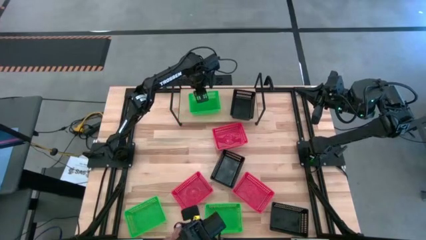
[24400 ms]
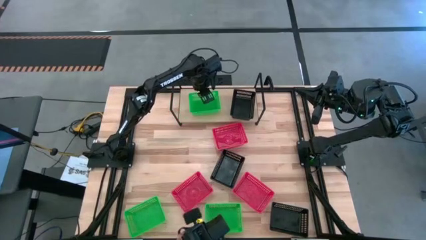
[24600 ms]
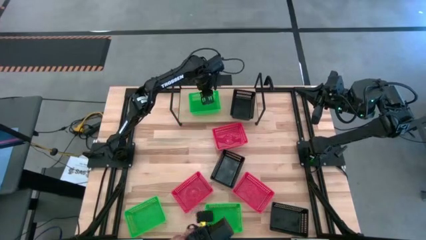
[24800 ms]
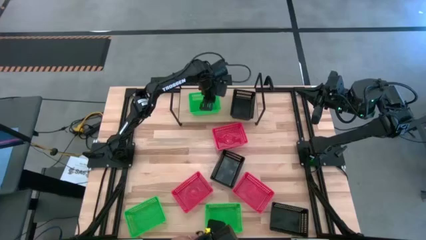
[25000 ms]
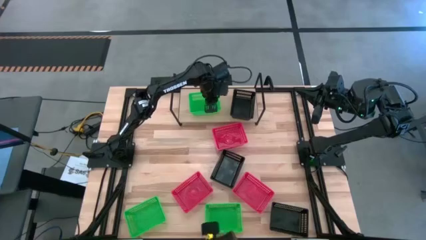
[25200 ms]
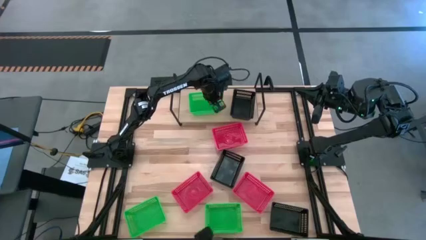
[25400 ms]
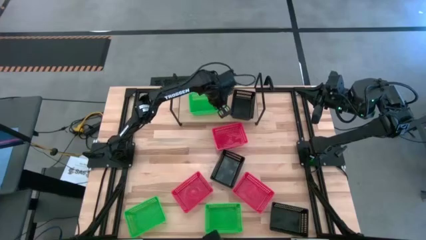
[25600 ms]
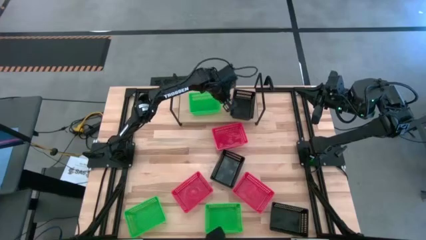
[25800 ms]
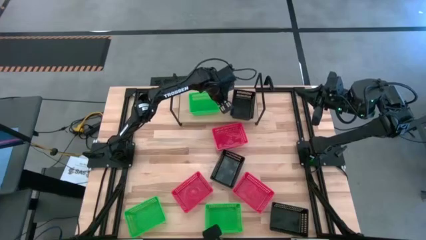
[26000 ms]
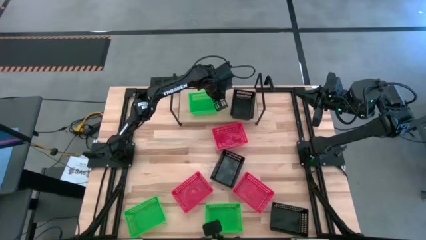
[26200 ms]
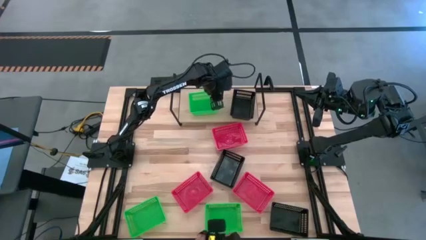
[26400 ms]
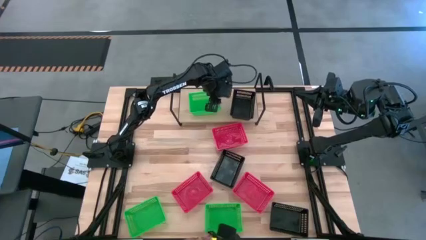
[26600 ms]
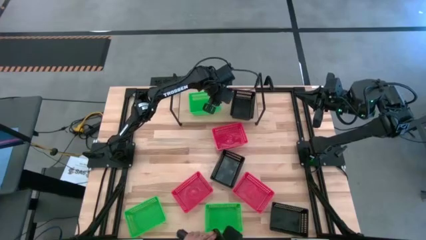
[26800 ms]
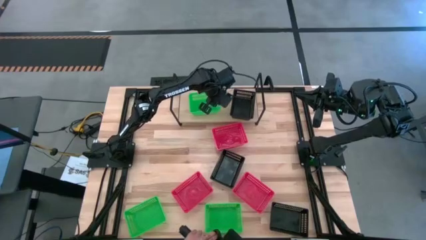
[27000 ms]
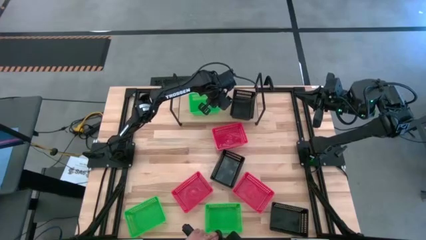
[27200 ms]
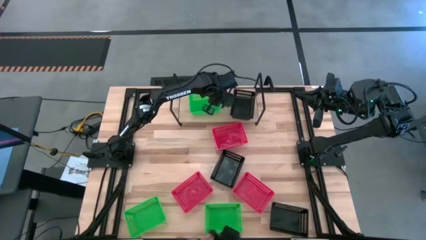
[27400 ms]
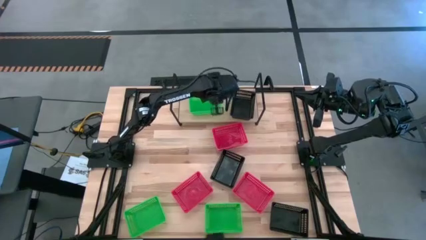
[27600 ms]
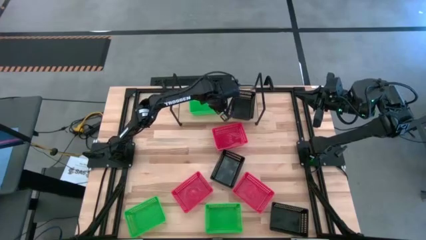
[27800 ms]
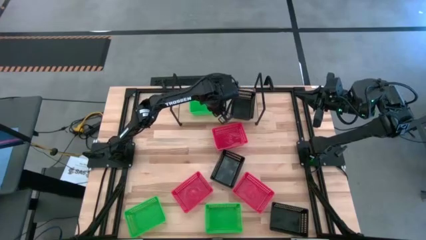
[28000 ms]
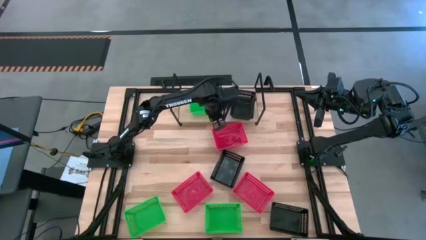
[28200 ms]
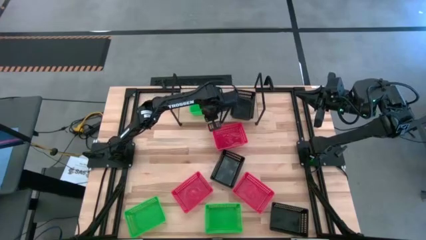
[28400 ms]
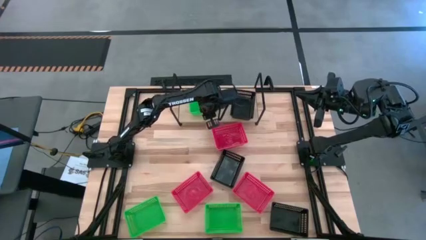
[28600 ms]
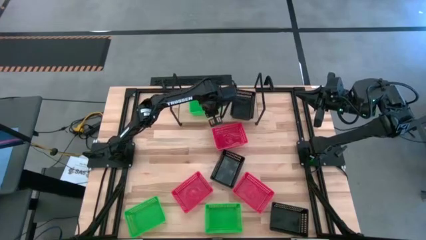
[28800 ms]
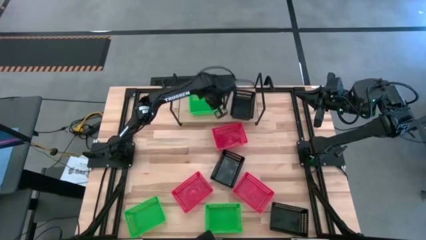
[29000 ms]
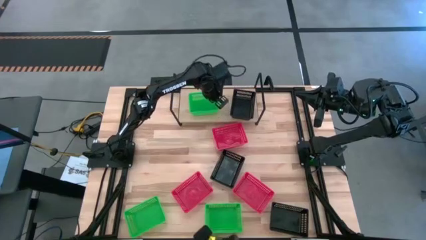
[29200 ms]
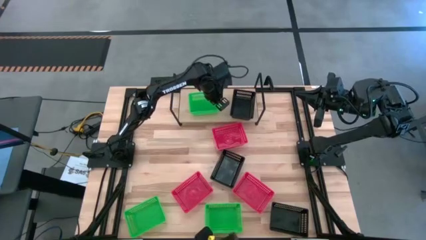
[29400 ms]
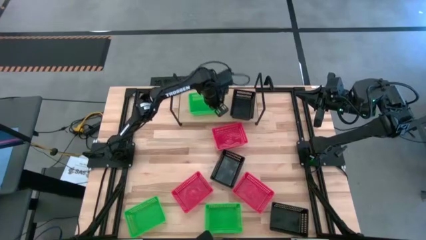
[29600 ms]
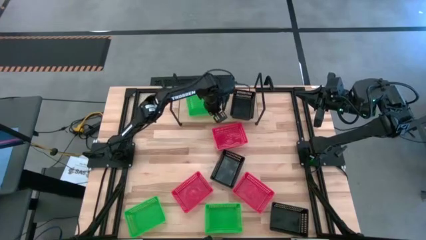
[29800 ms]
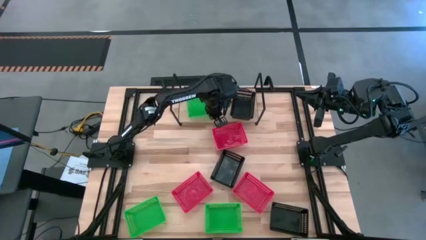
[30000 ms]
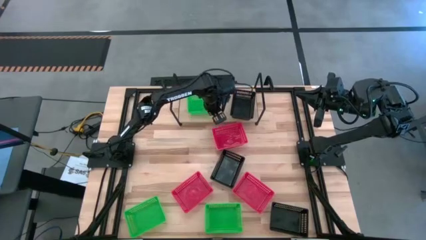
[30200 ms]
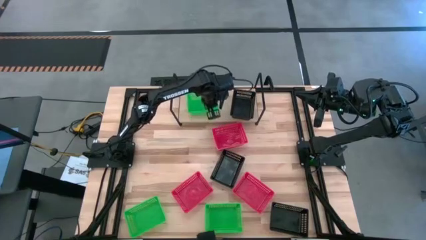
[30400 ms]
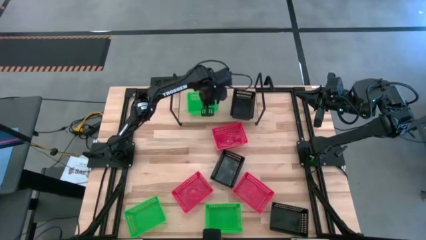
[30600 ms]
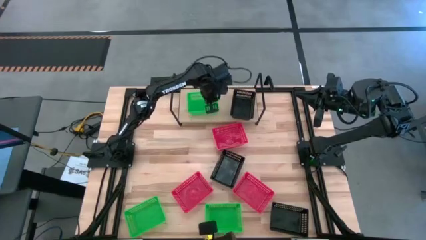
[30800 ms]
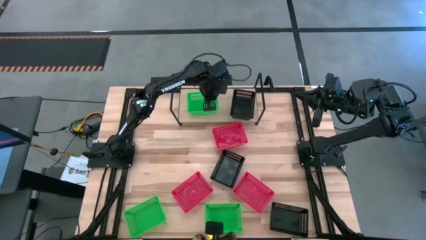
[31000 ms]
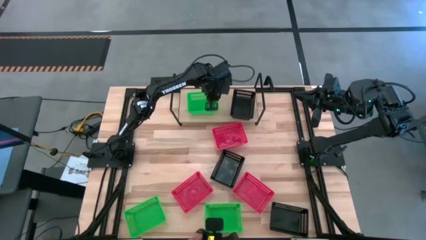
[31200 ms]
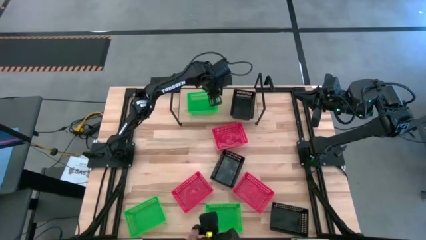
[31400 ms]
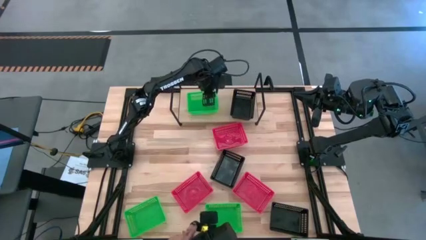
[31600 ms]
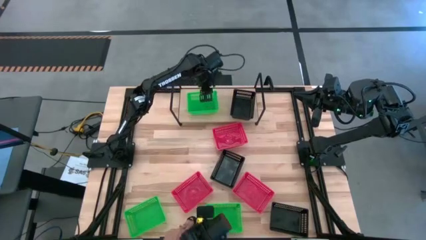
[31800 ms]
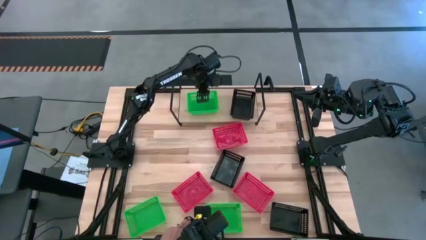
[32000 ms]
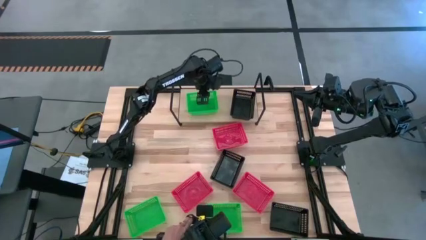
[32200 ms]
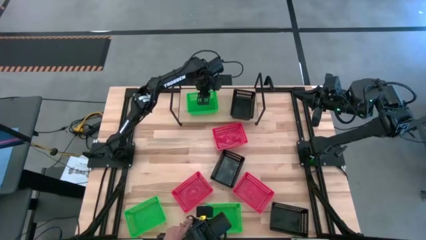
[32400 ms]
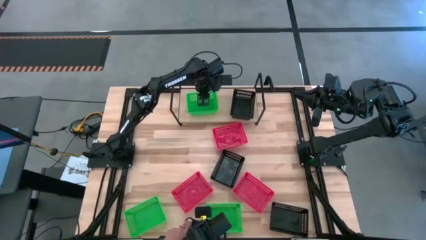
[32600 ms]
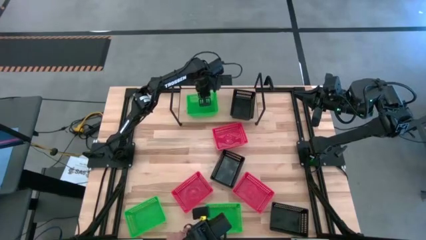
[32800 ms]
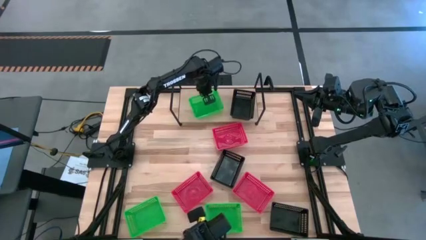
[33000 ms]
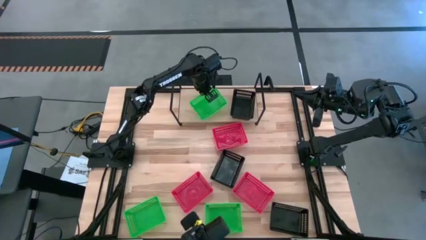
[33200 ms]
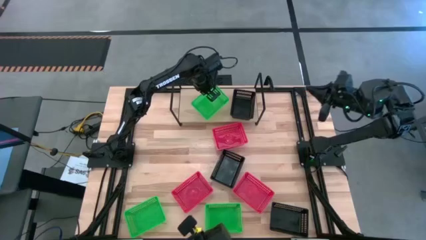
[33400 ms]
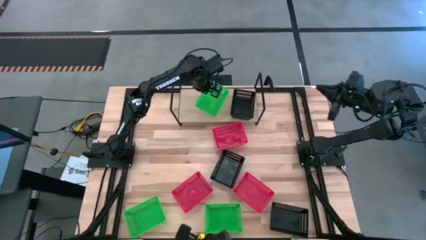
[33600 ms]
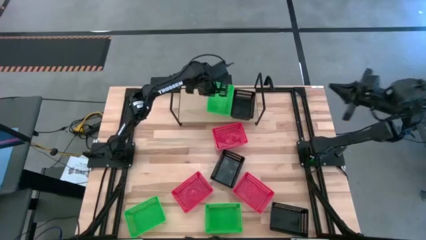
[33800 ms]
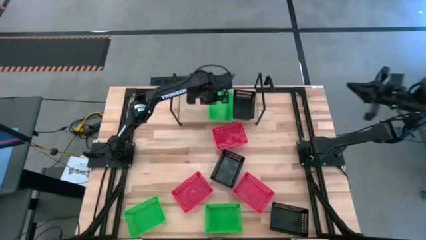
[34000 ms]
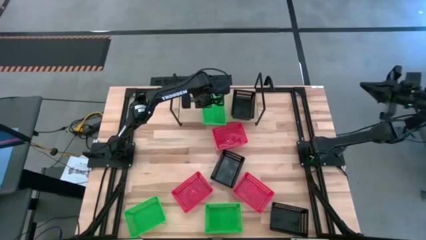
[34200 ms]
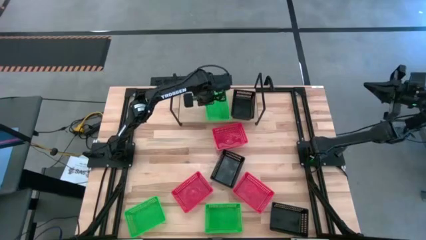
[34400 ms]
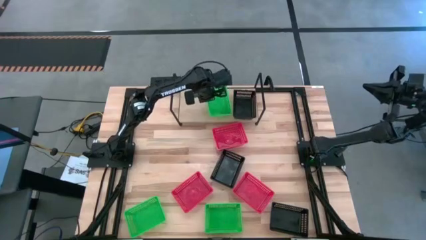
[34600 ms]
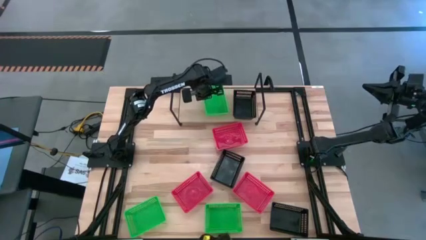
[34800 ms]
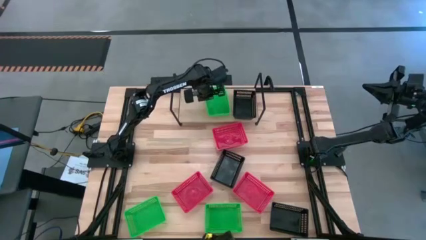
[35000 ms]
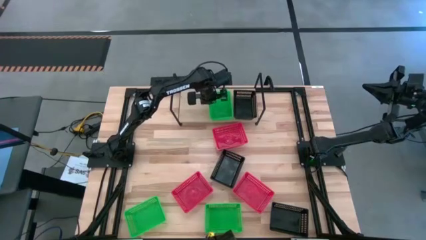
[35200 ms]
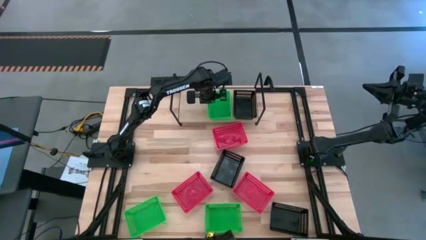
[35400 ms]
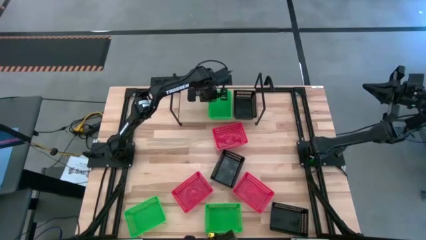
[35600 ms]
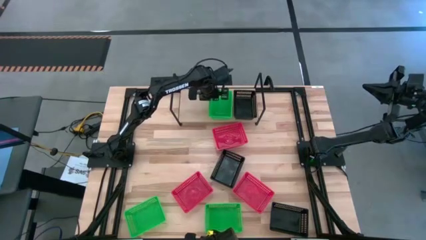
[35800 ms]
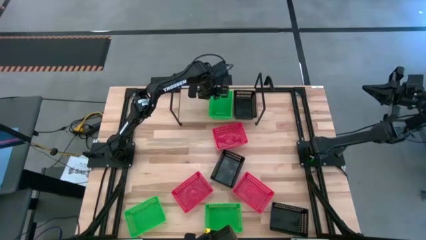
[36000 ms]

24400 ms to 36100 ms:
Task: Stack baskets on shelf by color
Put the top green bin on the shelf

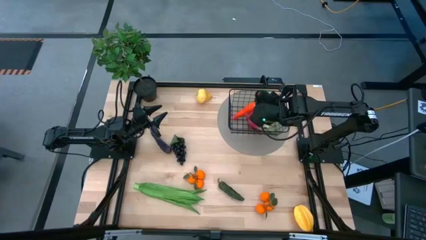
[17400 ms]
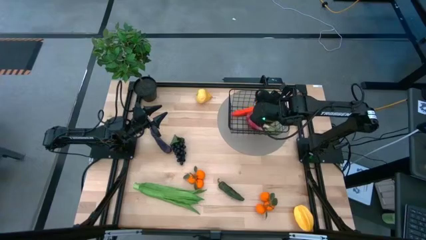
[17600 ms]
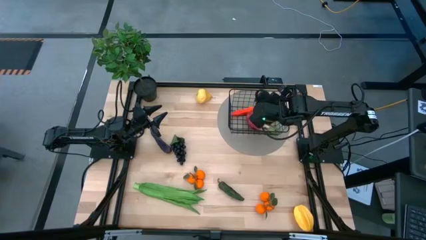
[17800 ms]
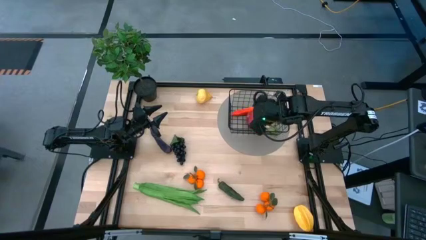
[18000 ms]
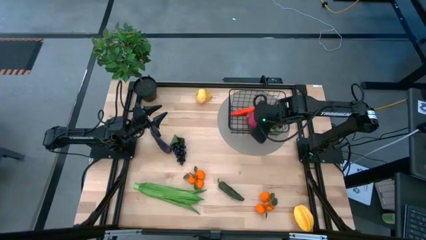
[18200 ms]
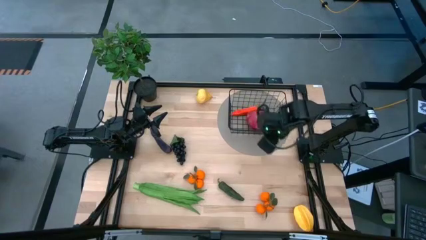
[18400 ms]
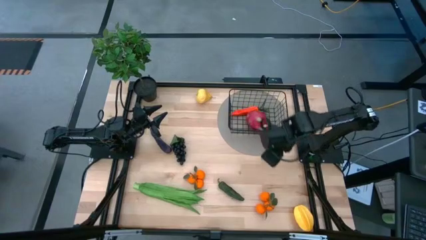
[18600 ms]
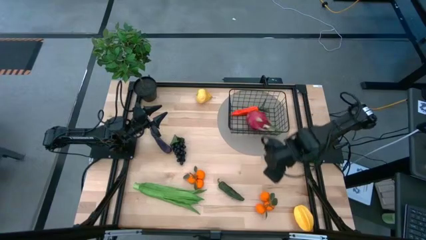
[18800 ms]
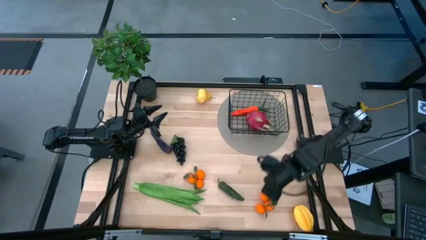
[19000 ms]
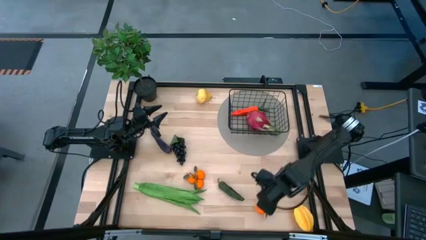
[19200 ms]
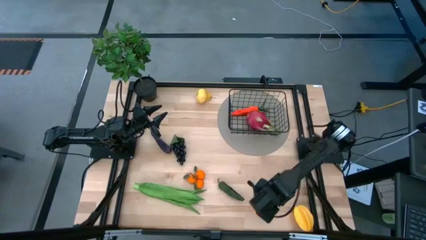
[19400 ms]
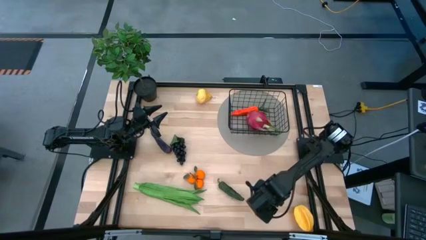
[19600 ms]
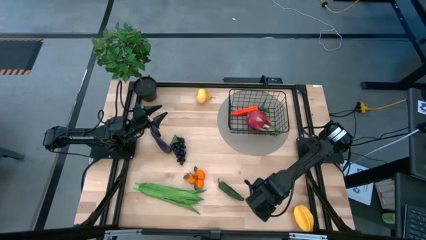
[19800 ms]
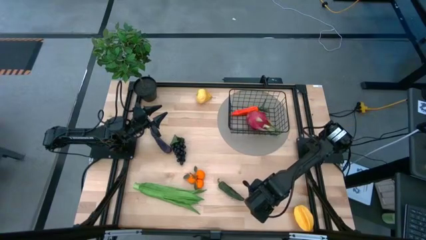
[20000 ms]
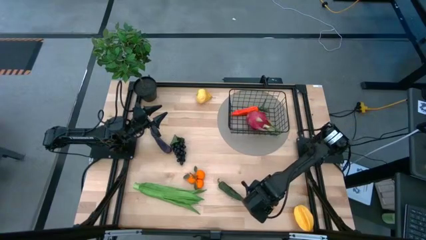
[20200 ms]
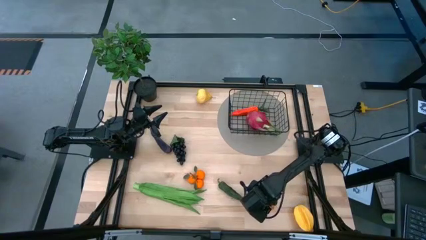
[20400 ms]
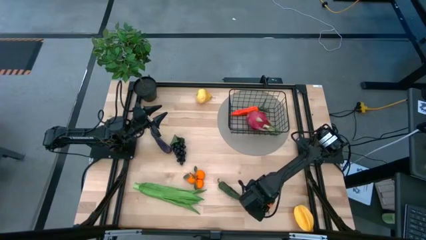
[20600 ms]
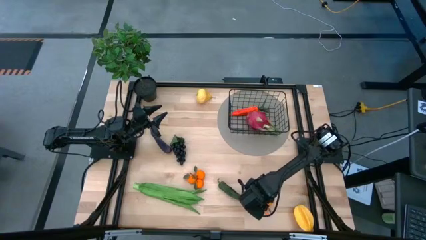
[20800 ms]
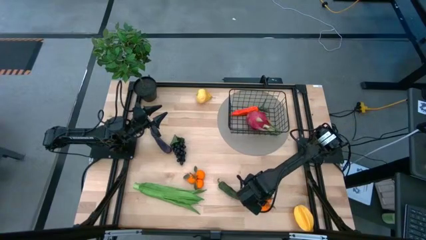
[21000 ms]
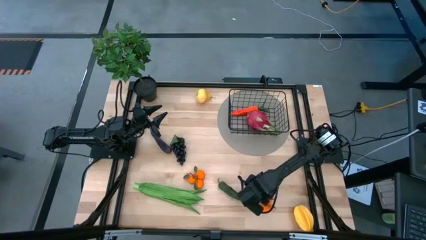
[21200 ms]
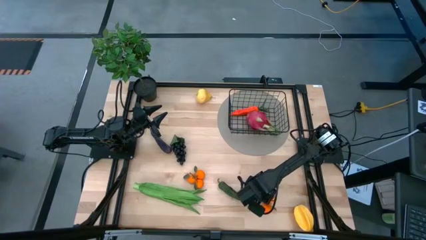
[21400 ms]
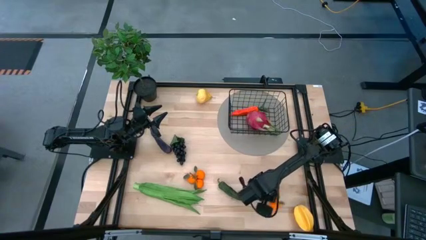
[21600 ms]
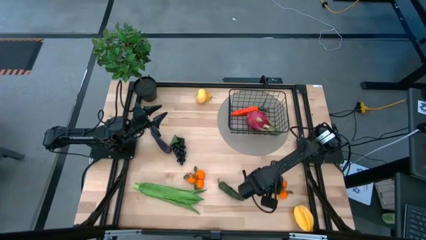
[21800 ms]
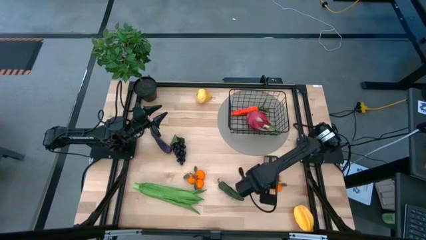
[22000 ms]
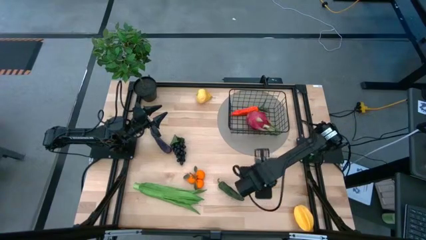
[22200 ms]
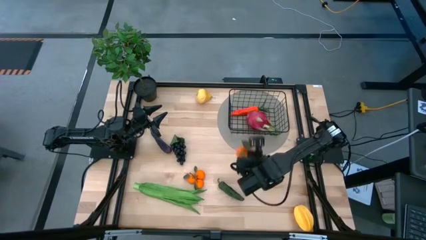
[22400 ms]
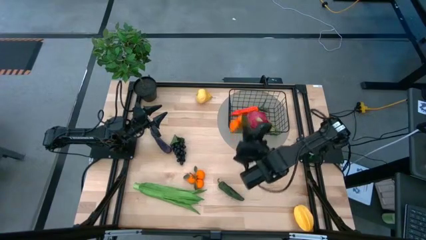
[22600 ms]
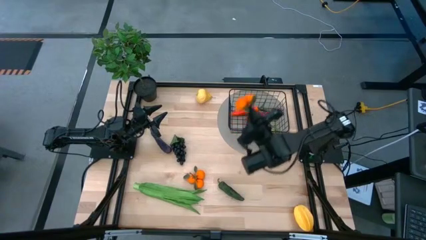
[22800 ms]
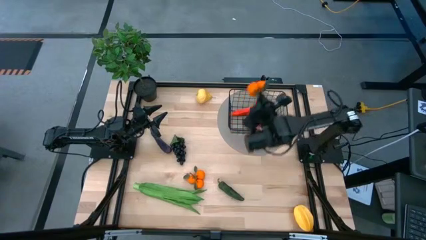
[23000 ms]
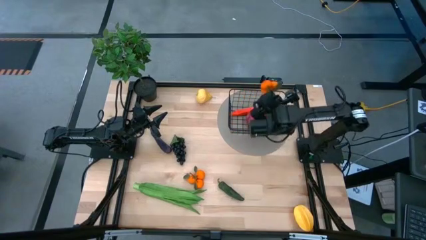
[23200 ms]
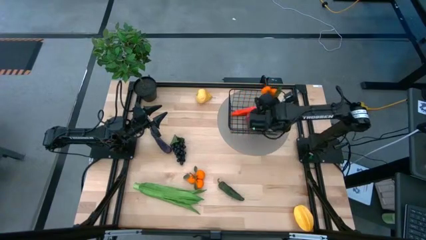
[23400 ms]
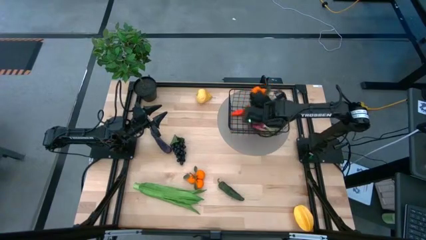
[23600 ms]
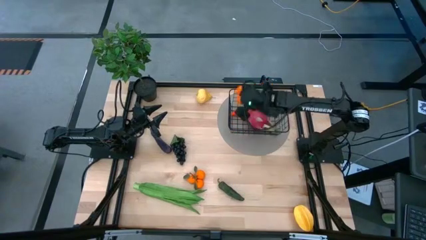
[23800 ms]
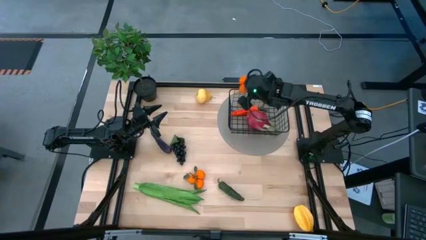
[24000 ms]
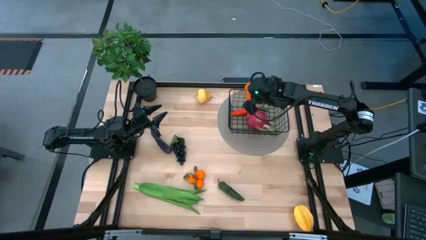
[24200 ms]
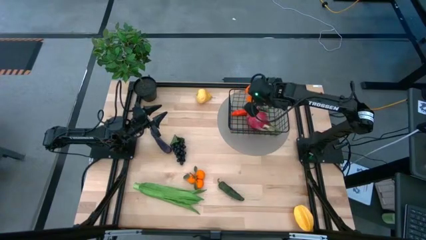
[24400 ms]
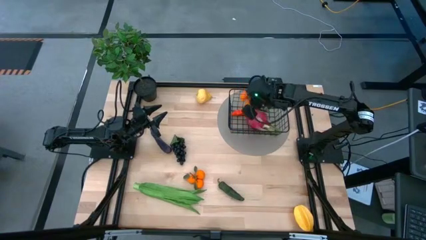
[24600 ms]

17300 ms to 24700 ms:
Task: Build produce basket
Put the right tangerines into the wire basket
